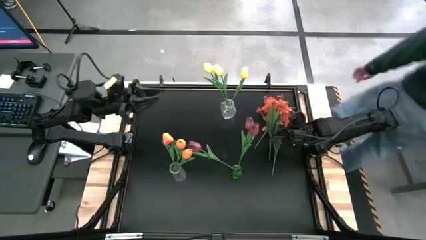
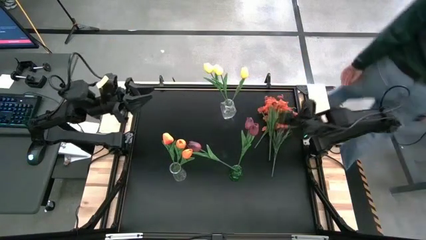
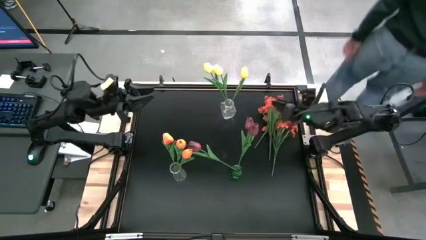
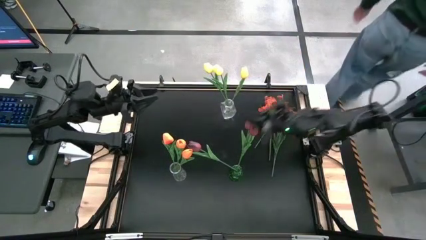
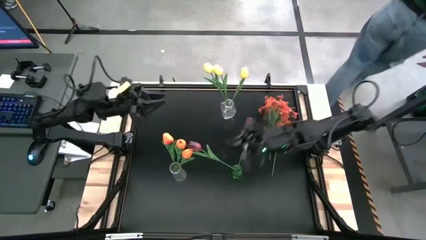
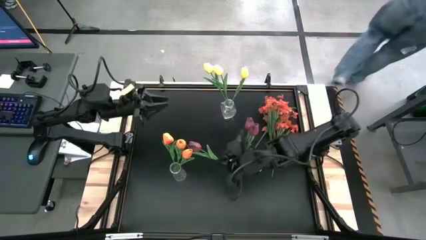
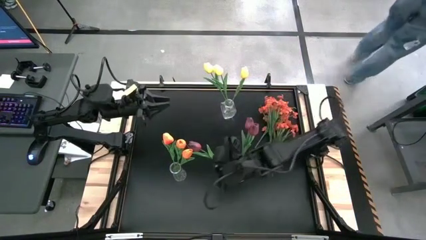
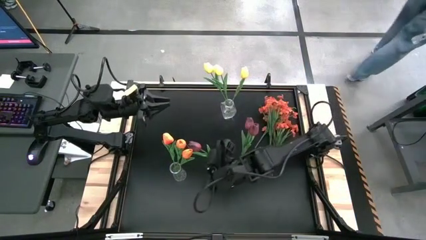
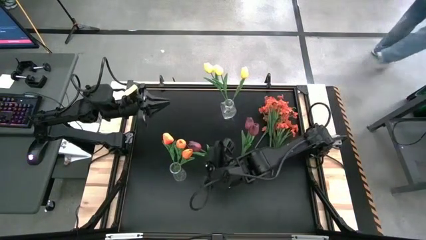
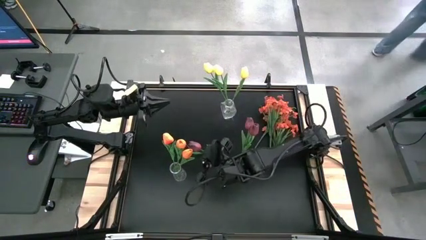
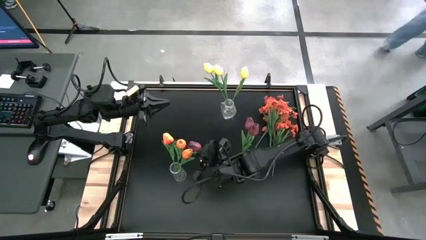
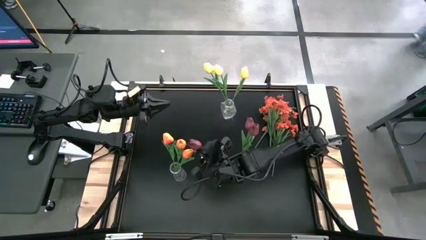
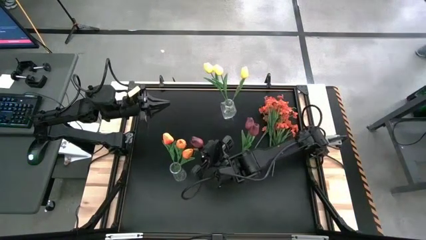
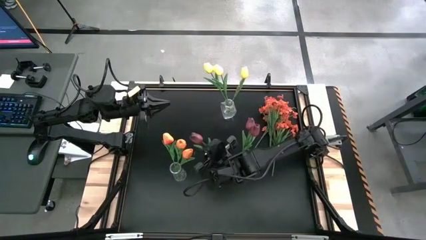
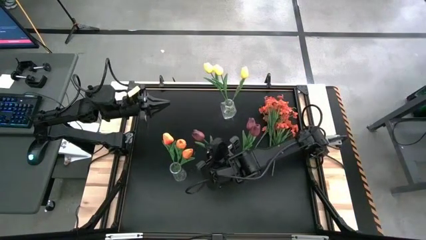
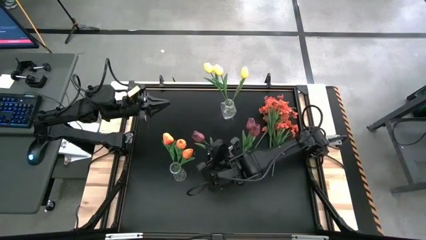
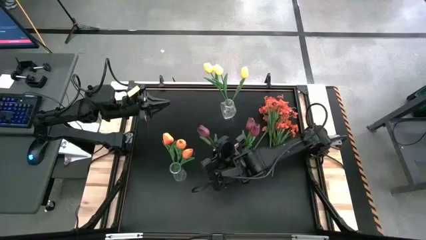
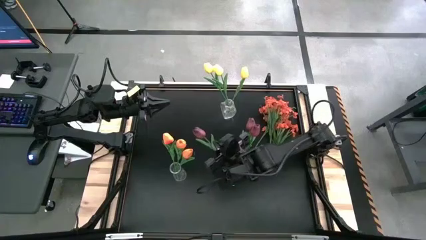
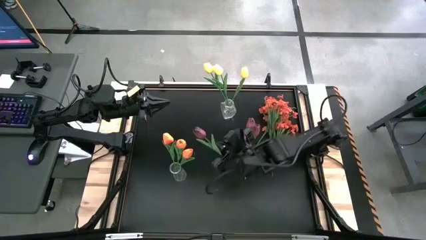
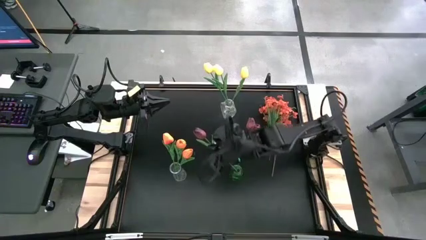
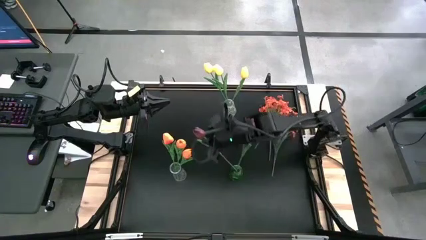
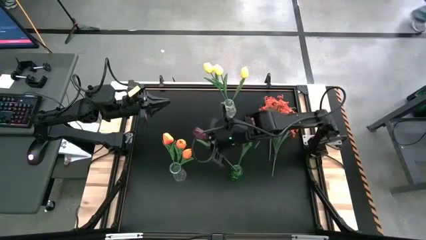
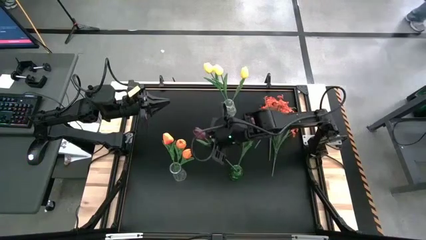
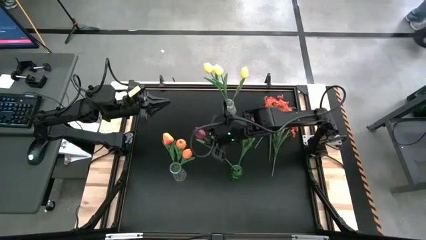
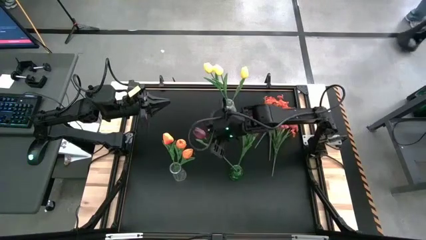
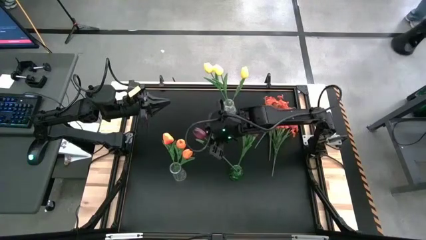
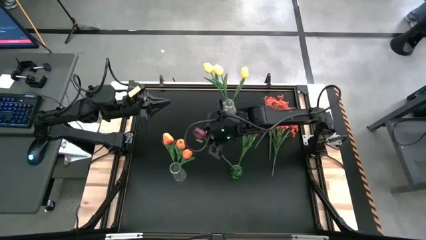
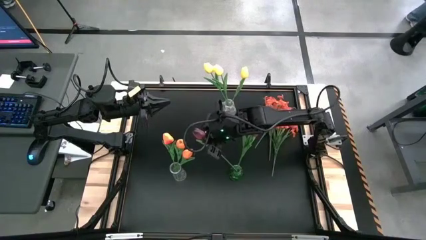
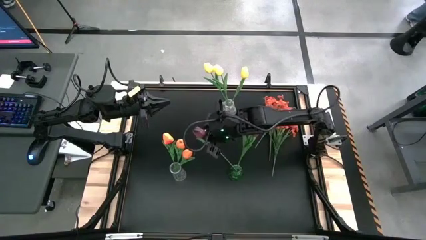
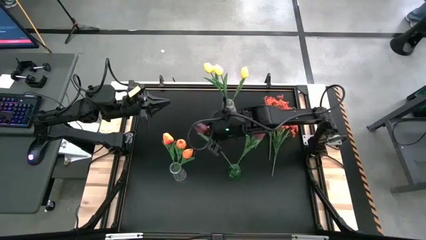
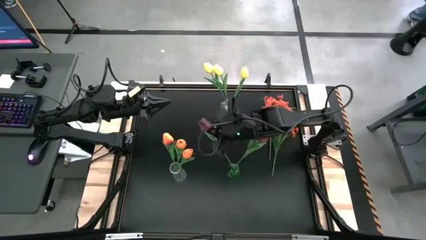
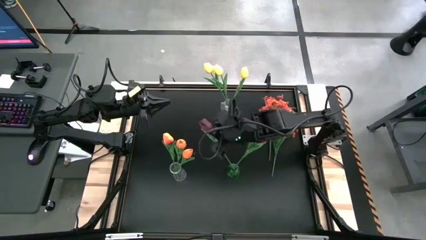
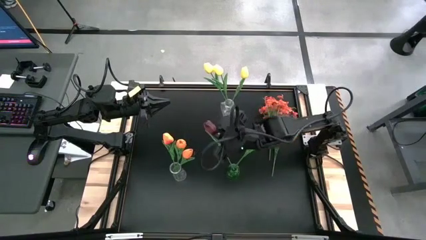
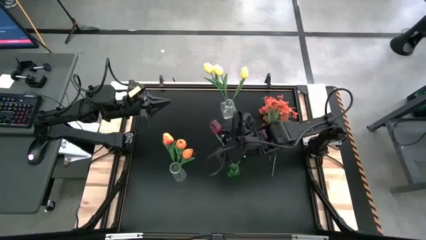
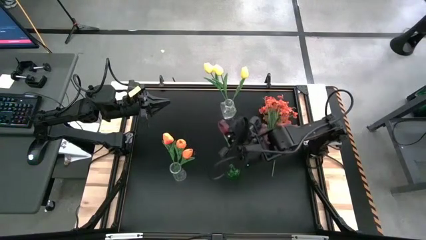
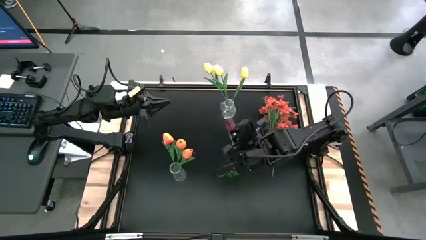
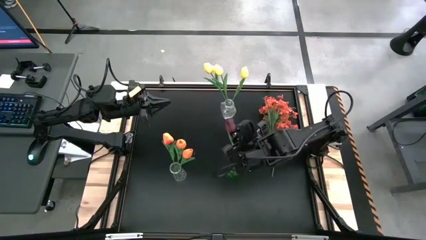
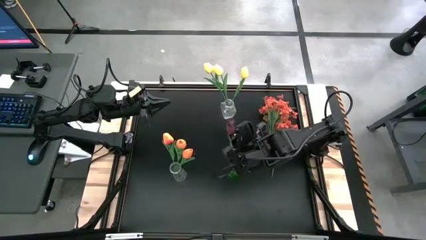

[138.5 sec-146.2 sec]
Task: Sort flowers into vase by color
Adjust the red tulips

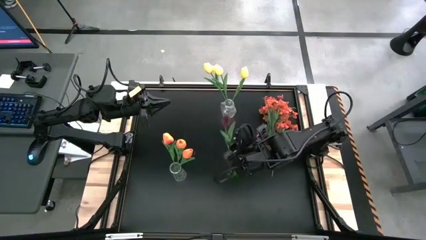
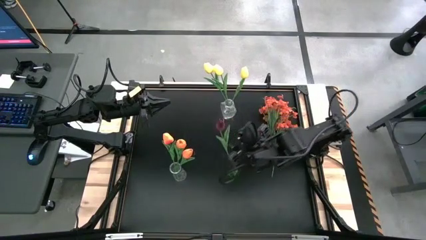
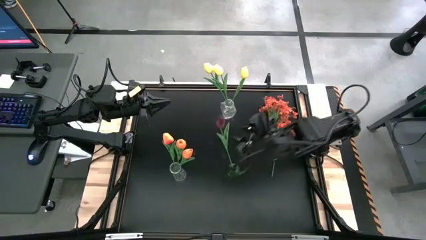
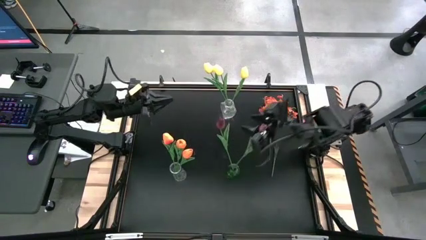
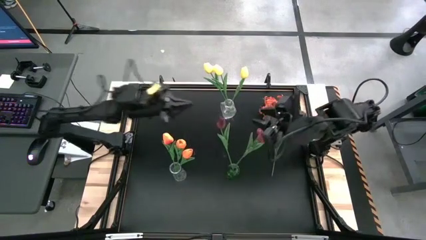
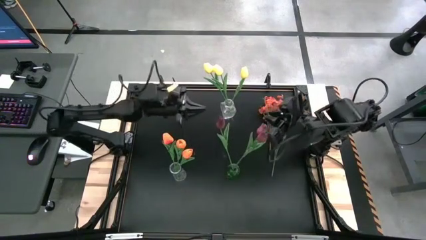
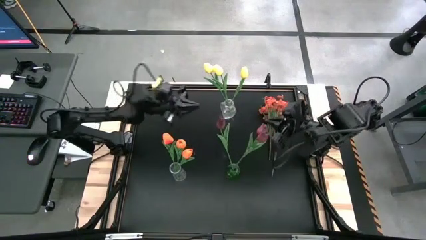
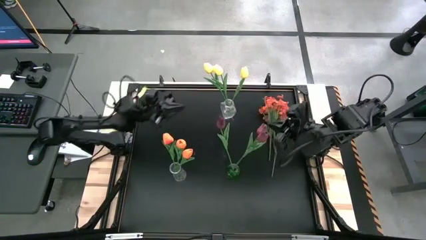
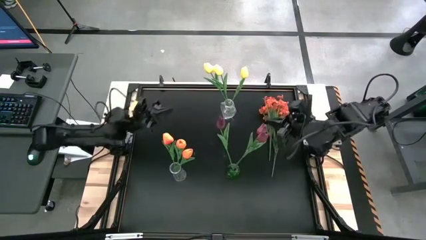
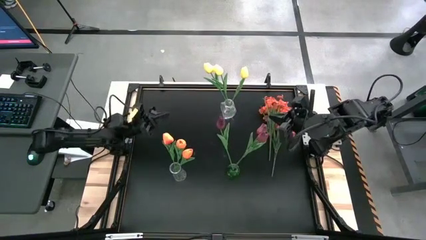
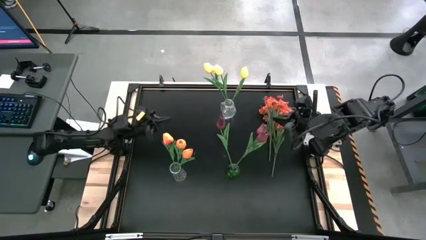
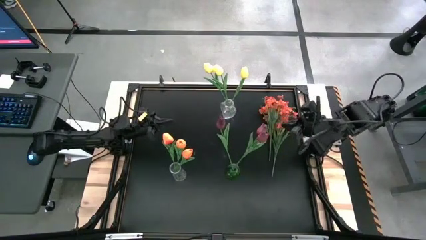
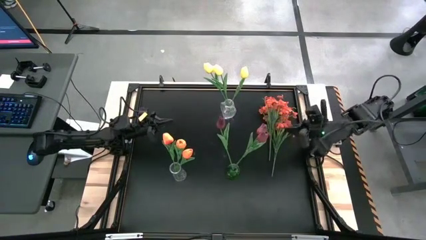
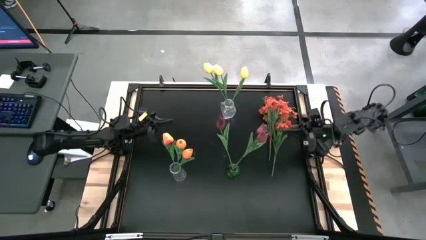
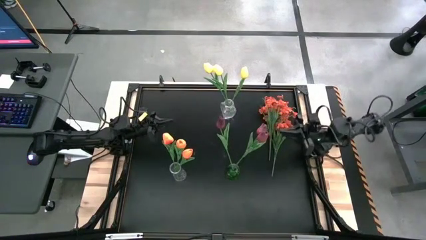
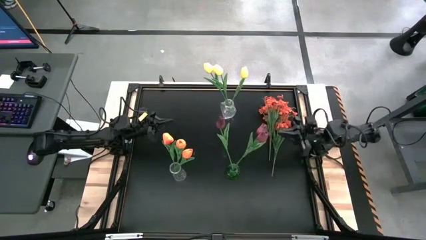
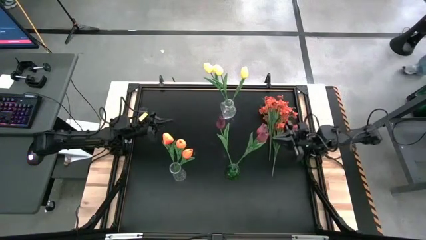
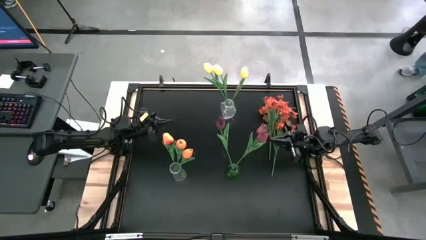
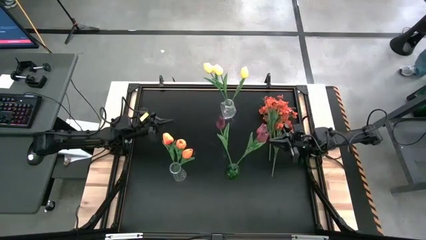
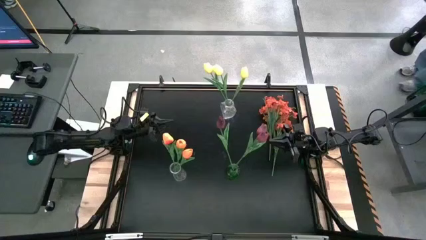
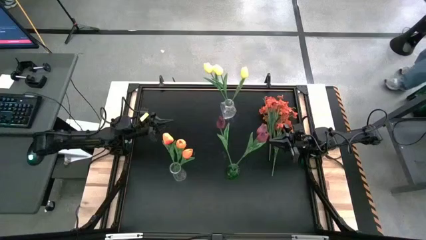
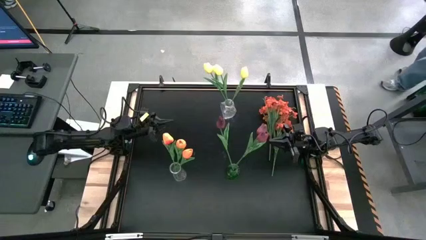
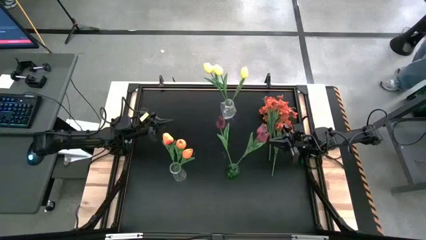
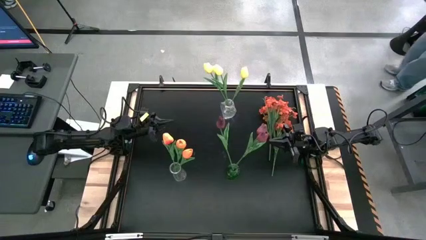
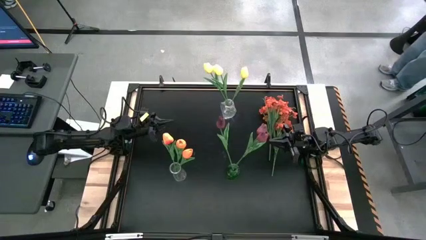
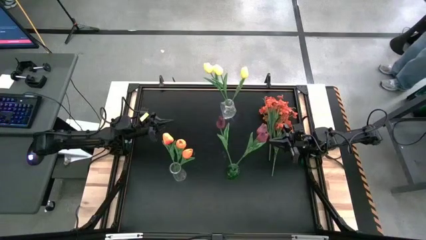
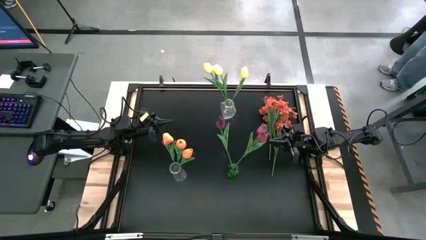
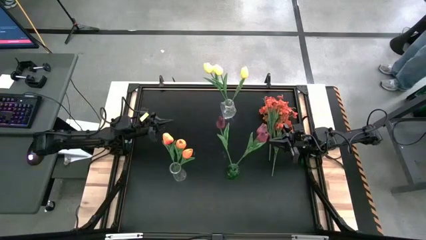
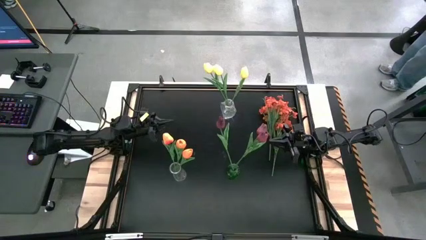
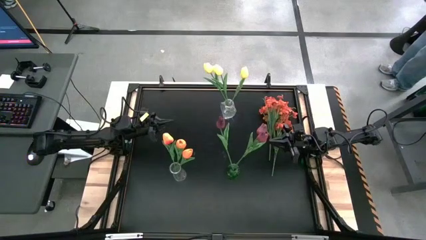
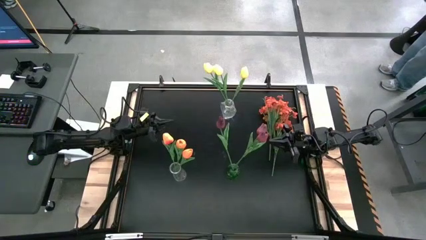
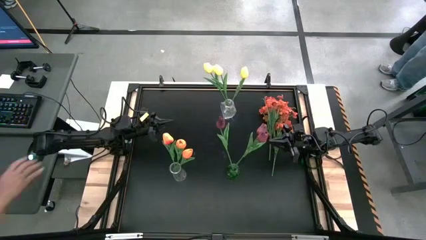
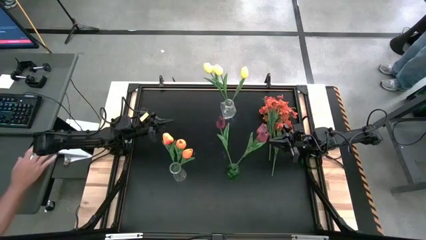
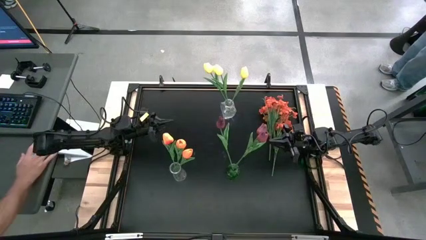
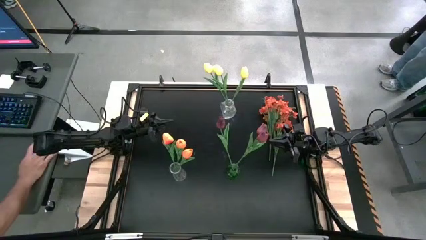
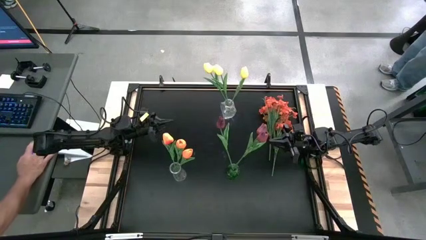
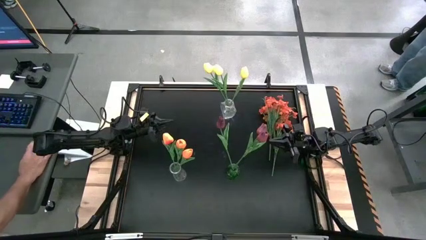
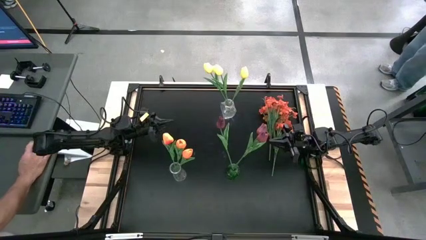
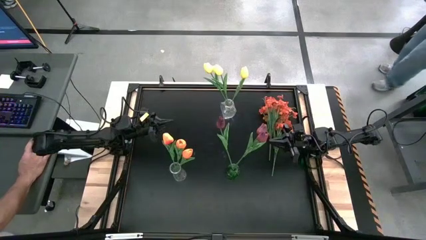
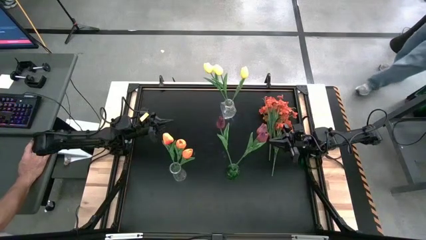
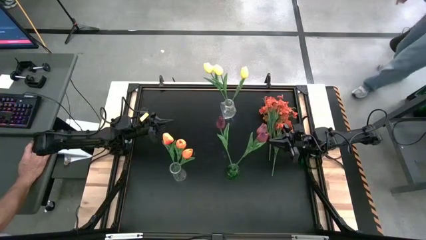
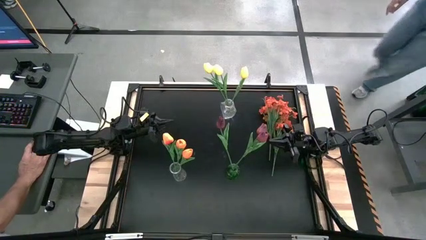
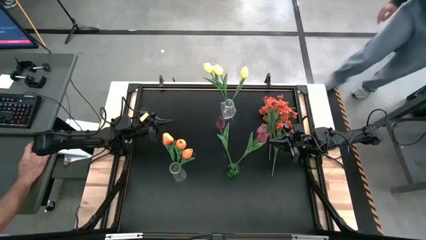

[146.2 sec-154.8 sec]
Return to Home Position
